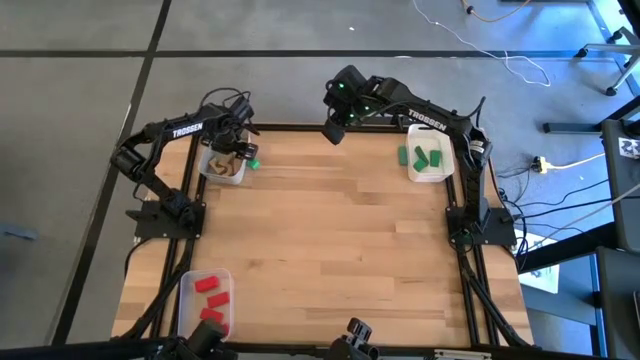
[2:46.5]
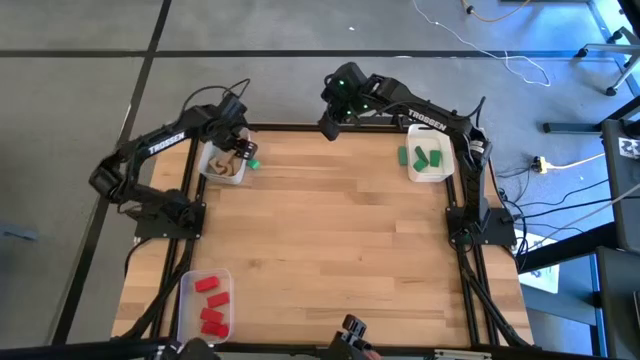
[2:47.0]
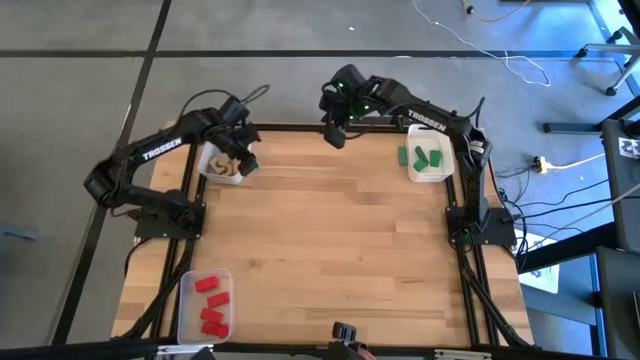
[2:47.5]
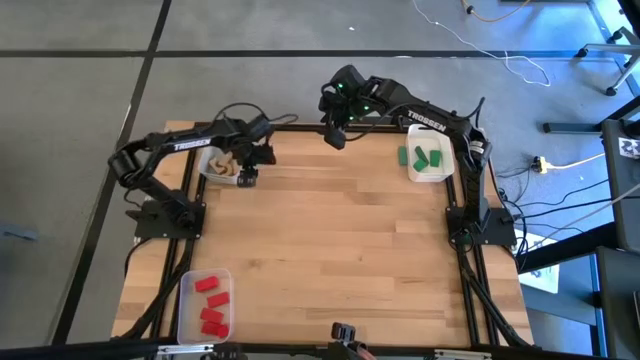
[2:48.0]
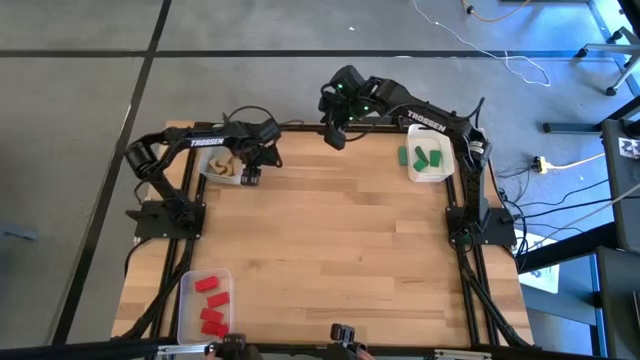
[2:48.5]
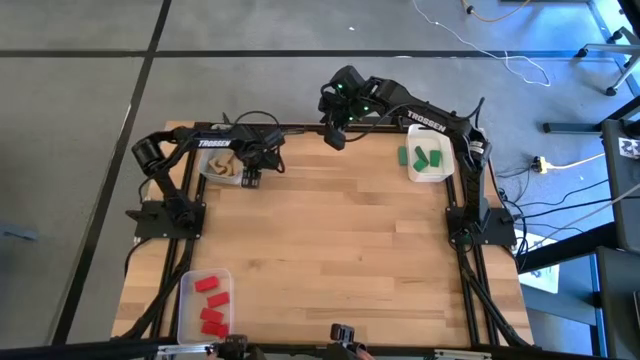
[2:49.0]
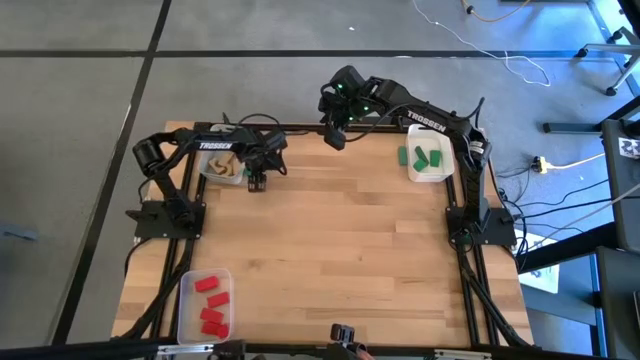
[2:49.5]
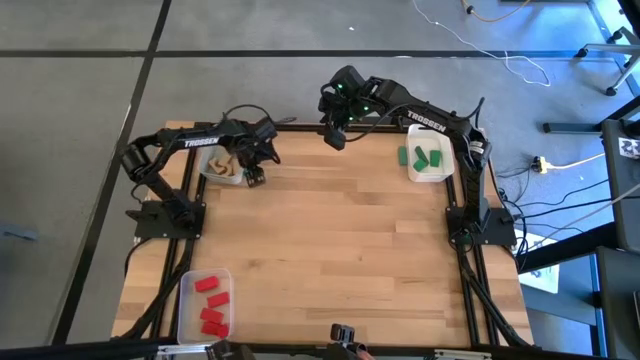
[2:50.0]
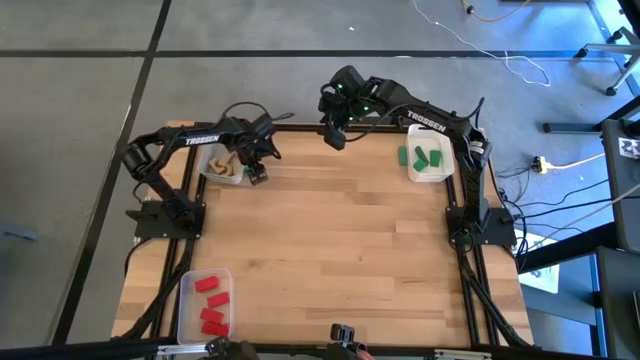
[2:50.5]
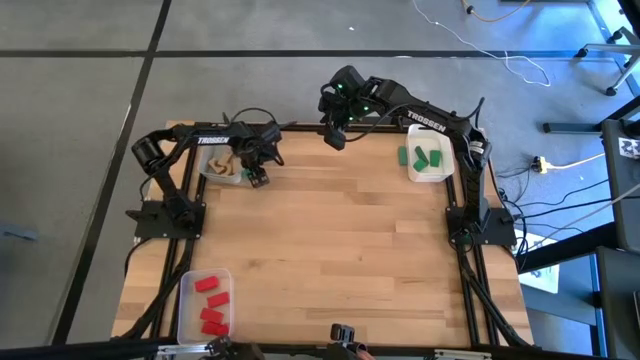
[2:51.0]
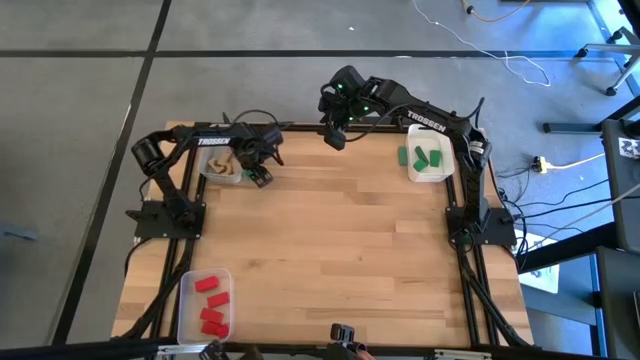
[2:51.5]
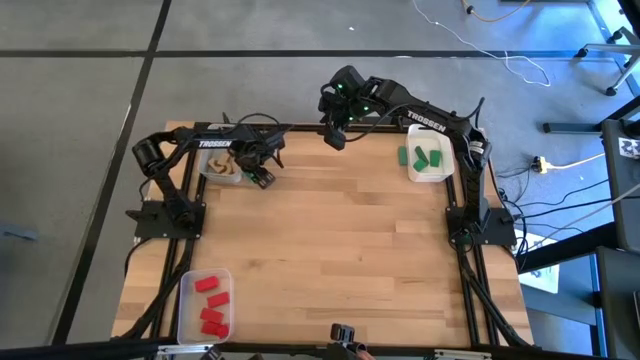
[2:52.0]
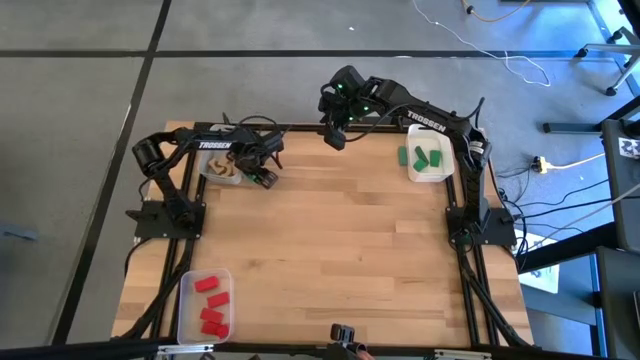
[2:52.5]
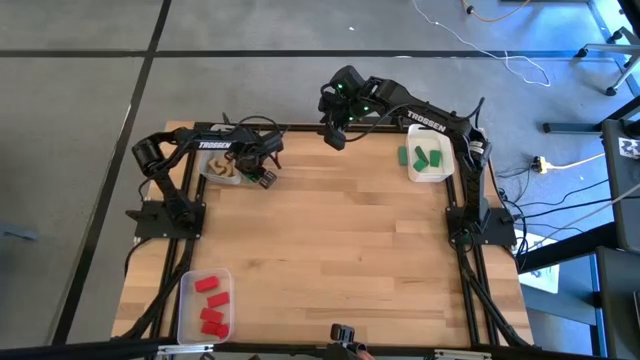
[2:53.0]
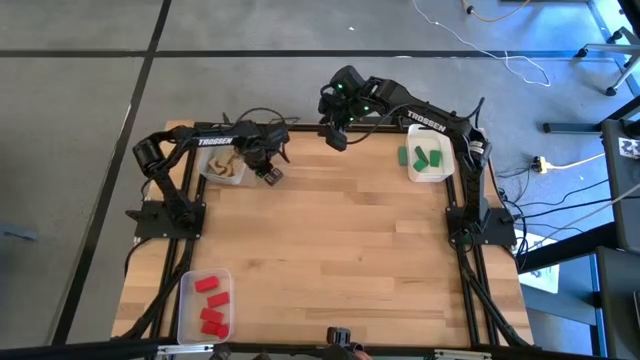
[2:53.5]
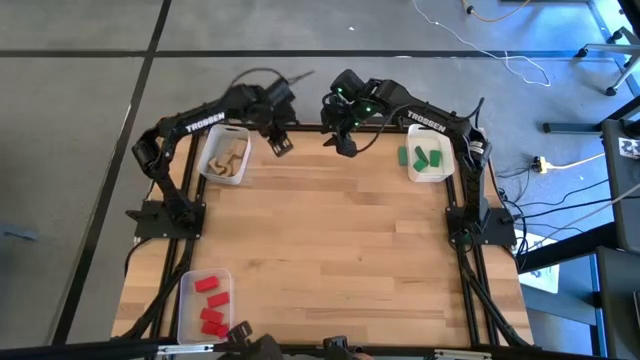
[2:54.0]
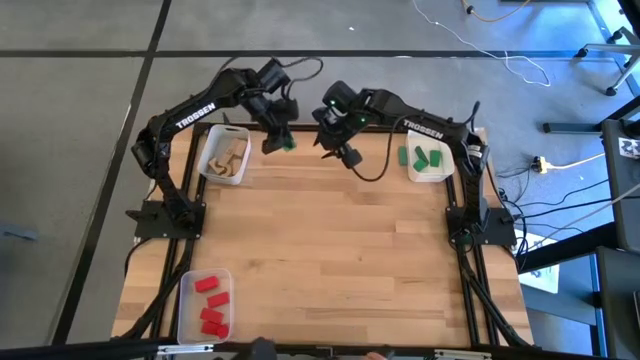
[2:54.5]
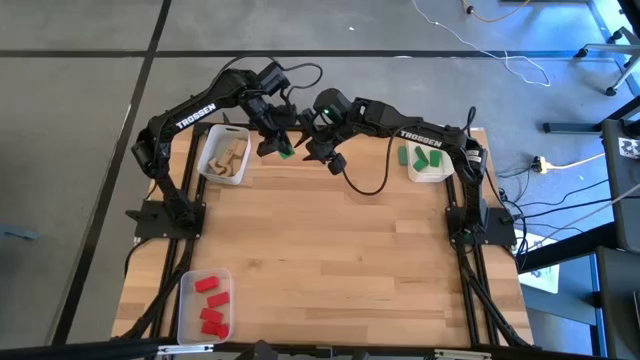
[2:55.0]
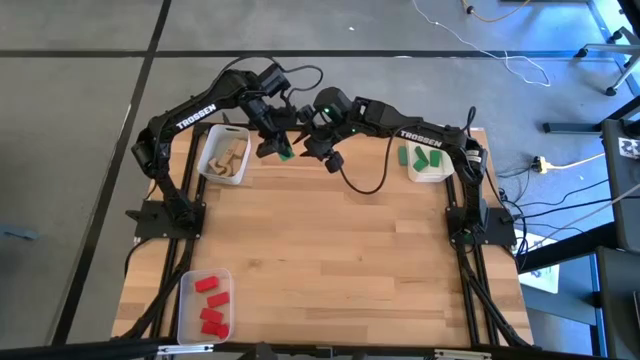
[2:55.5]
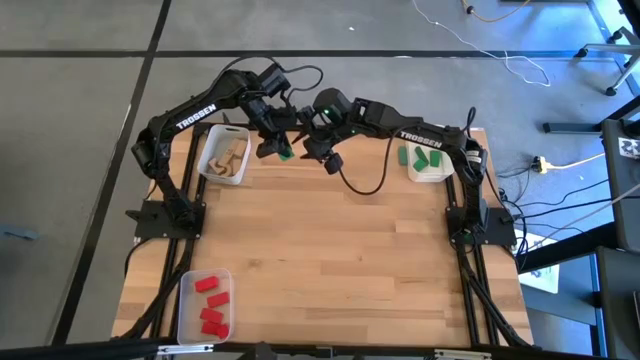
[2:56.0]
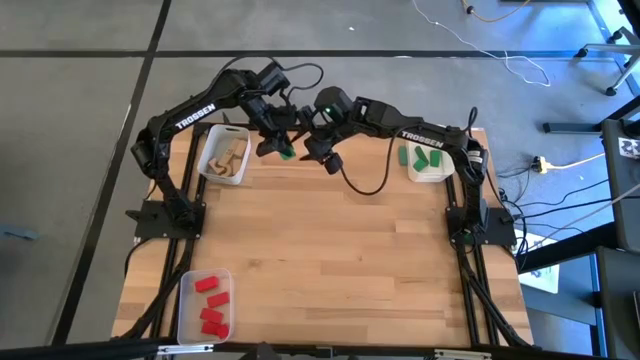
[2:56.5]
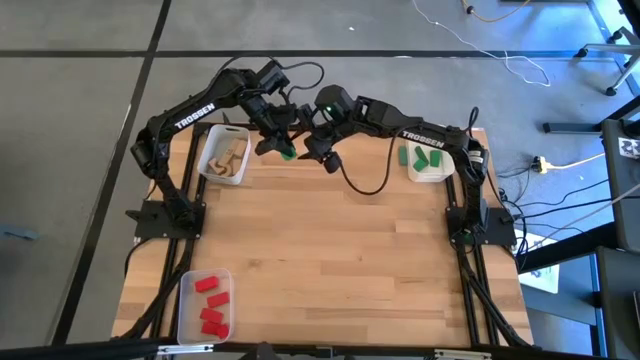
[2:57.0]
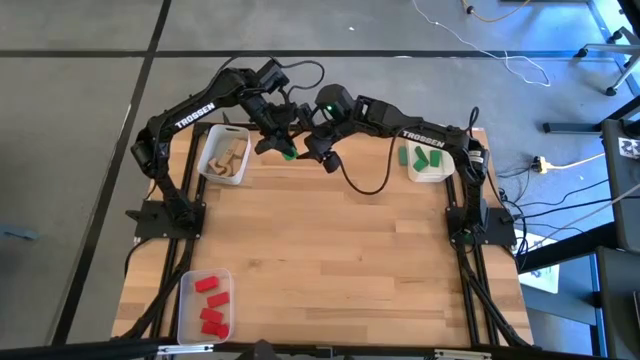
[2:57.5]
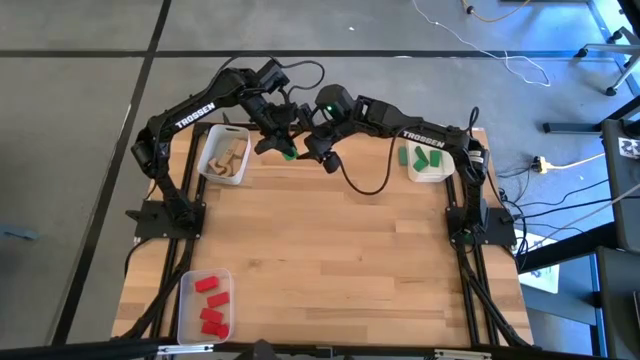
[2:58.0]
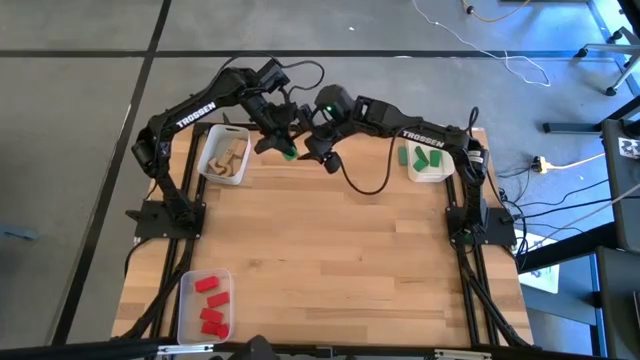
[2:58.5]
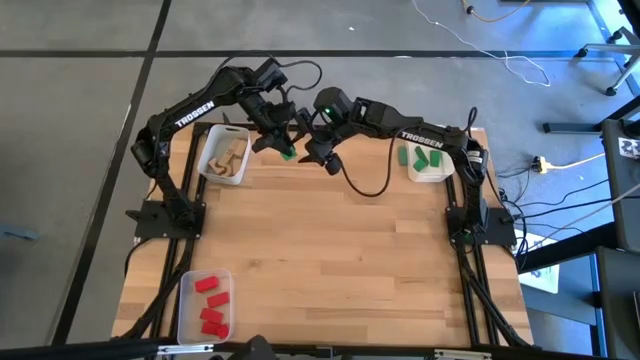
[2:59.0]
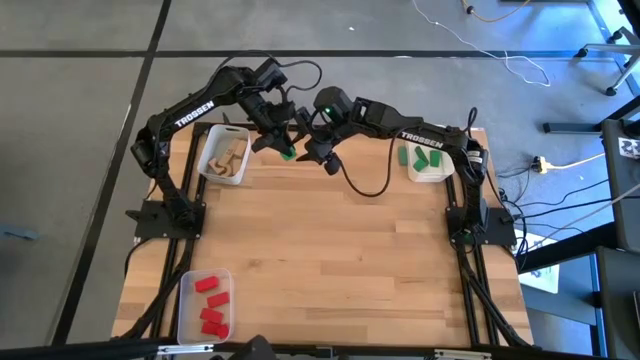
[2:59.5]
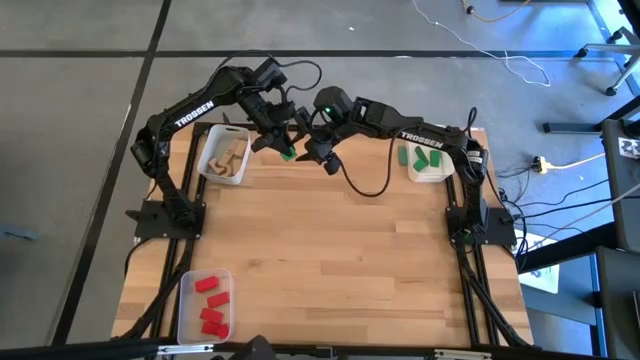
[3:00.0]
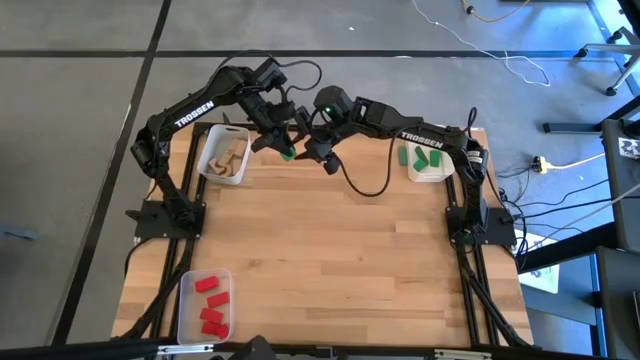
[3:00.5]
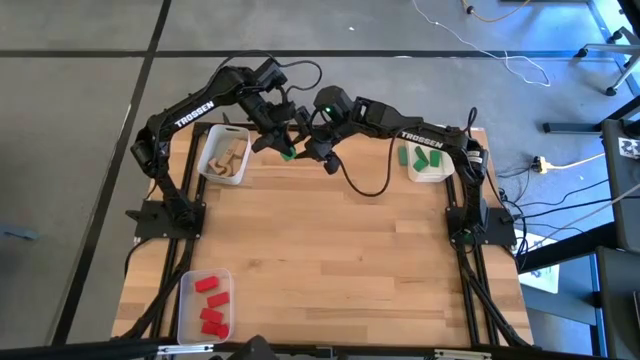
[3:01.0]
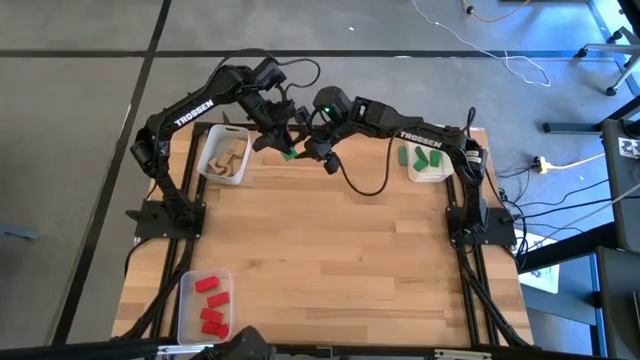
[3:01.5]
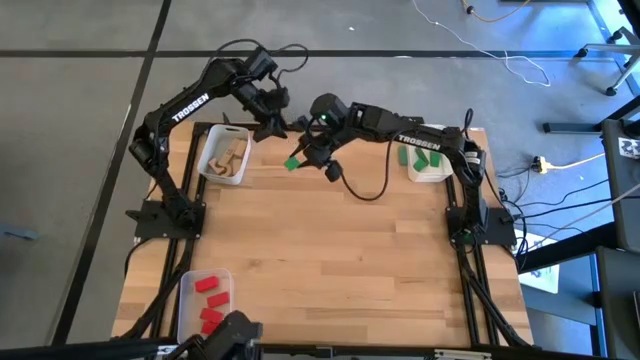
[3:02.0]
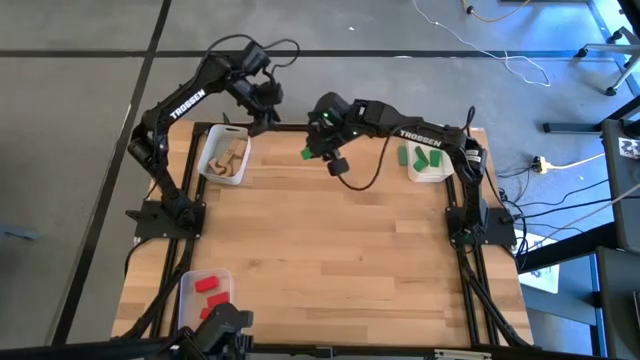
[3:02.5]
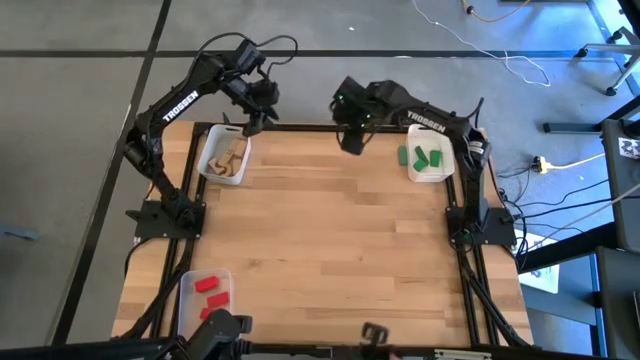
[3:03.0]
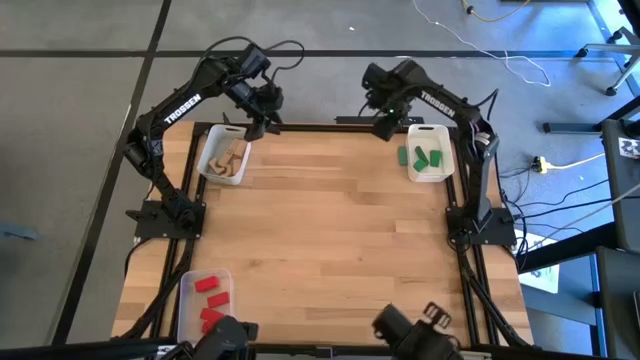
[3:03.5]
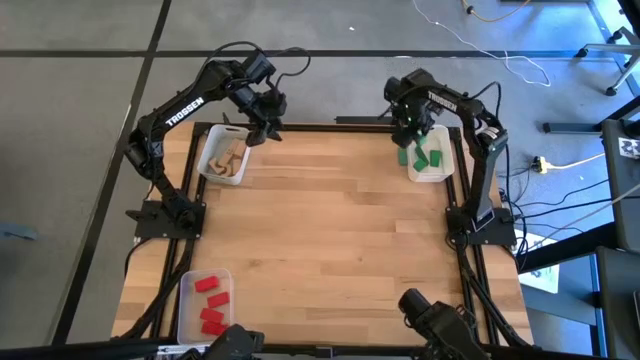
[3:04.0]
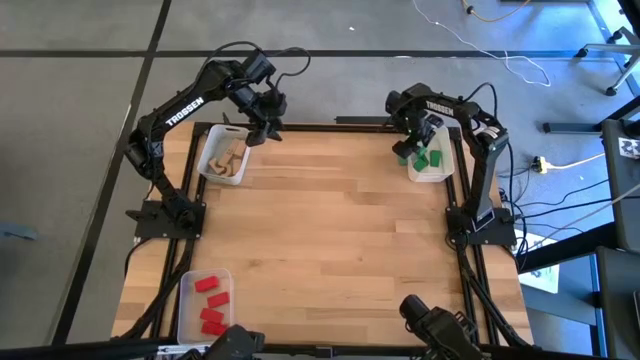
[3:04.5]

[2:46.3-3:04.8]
Task: Sort & place blocks by color
Put the green block into the white bin

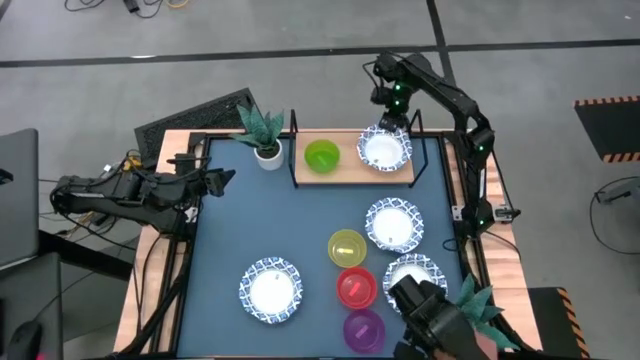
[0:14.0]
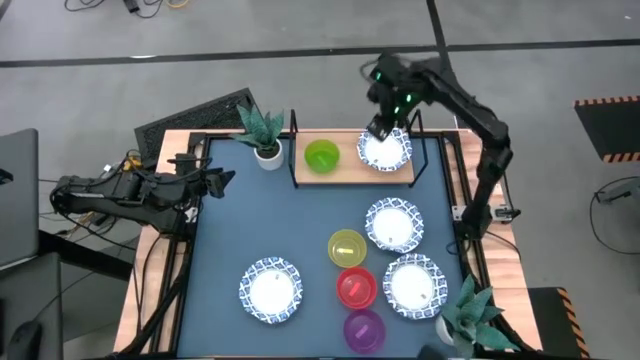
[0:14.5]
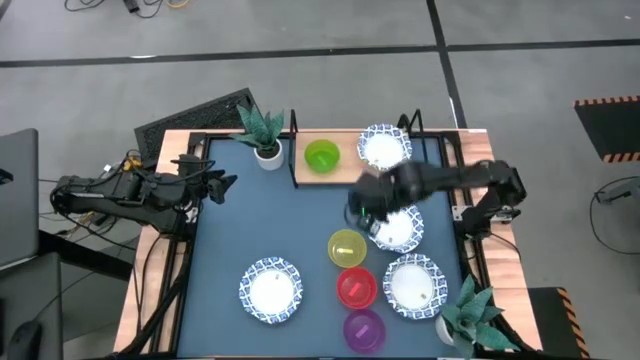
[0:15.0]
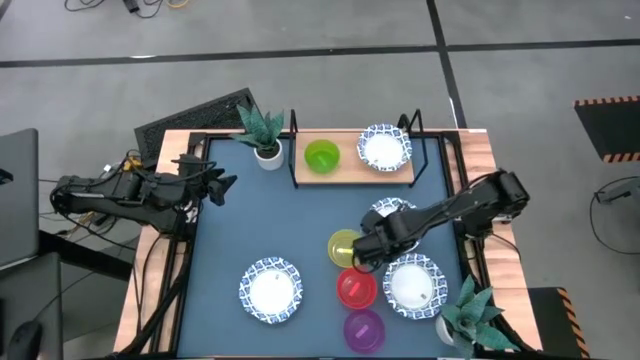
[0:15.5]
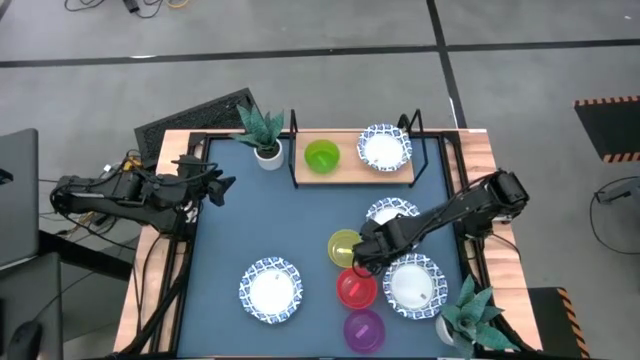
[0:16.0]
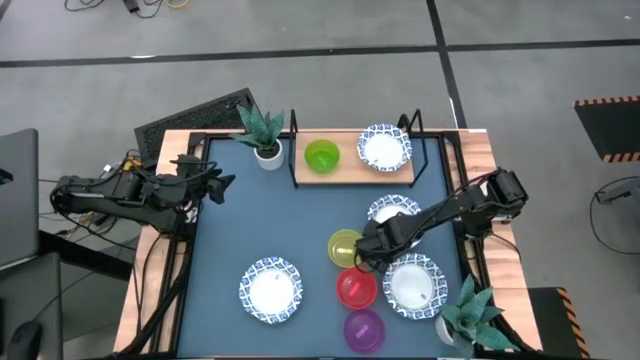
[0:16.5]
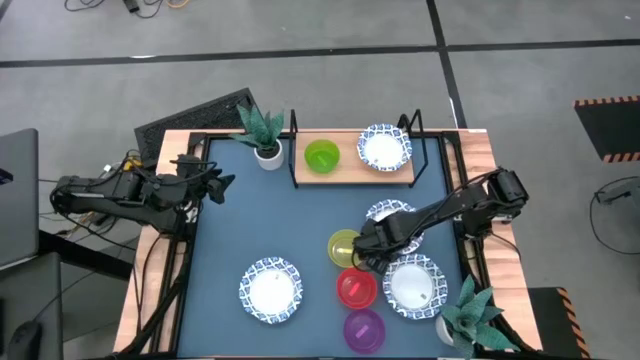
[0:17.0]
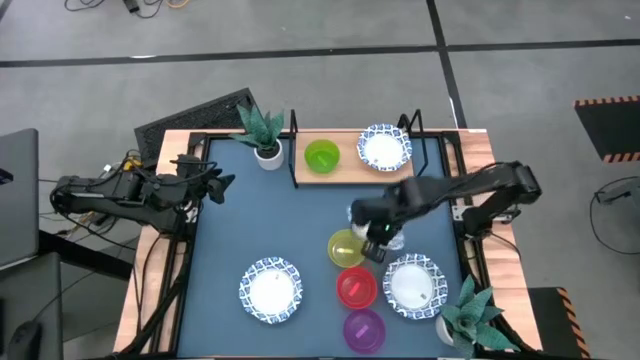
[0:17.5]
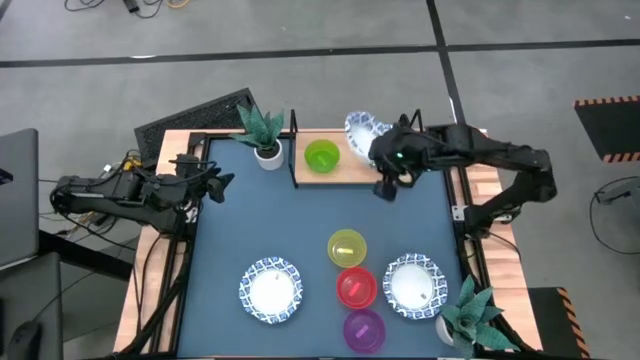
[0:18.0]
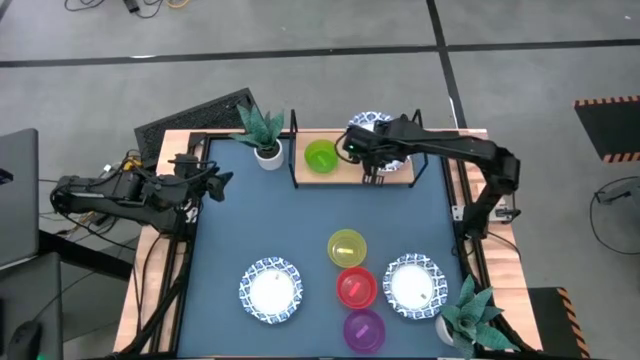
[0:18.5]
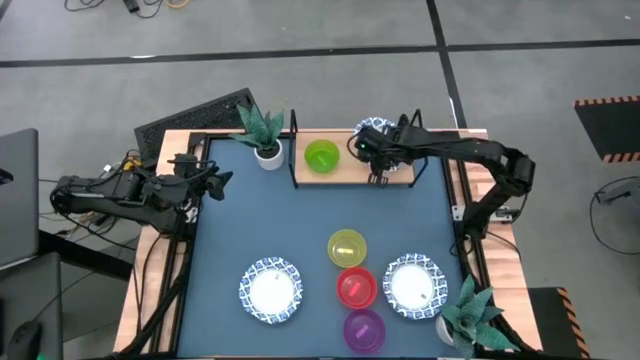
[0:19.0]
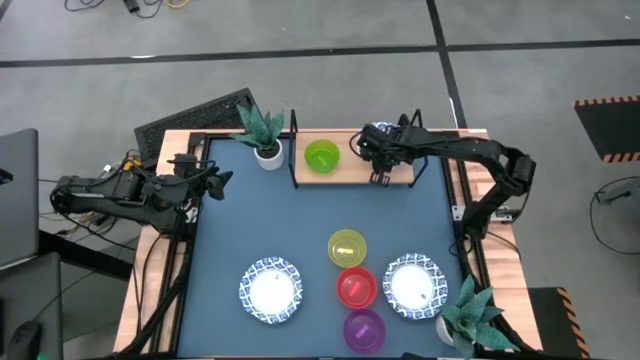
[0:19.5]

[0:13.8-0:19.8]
Task: Place and stack bowls onto a shelf
Stack the top white patterned bowl on top of the white patterned bowl on the shelf
